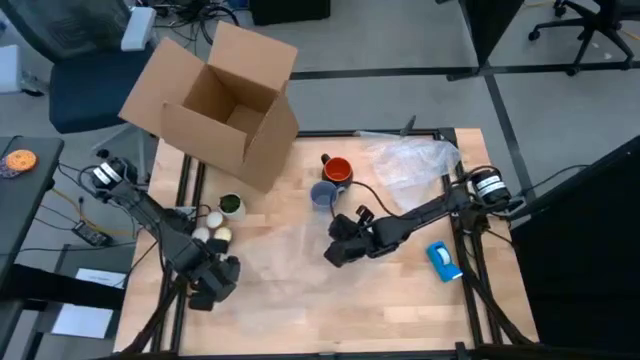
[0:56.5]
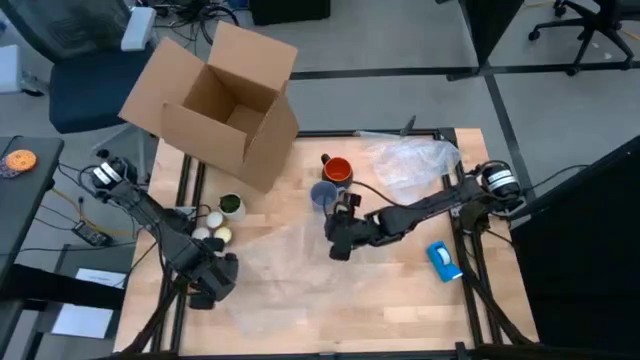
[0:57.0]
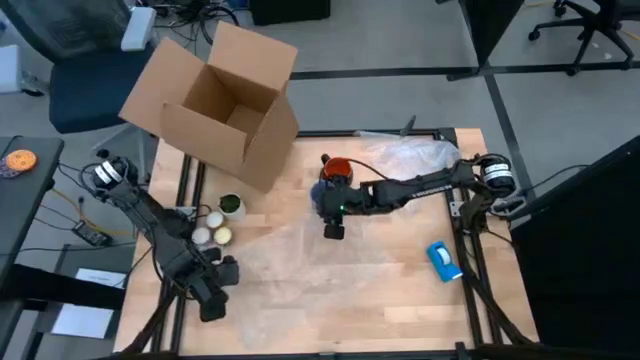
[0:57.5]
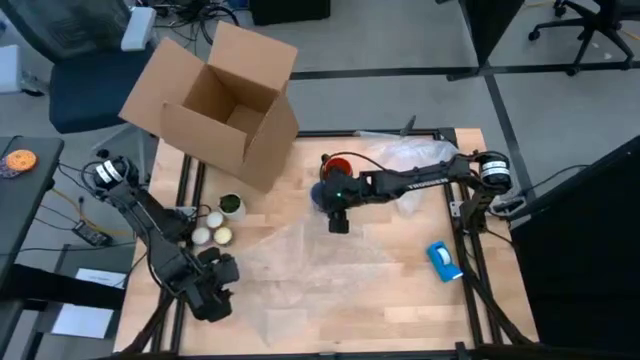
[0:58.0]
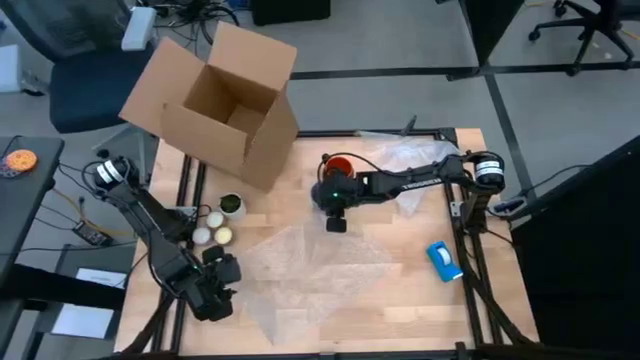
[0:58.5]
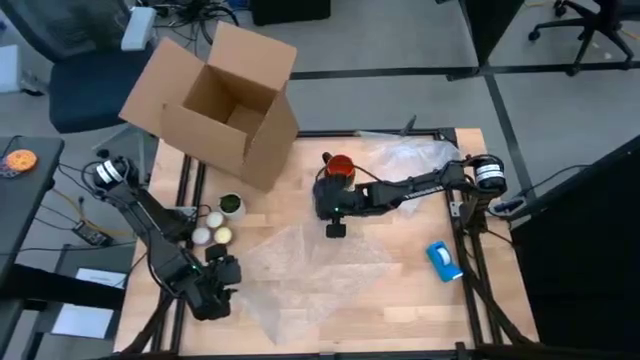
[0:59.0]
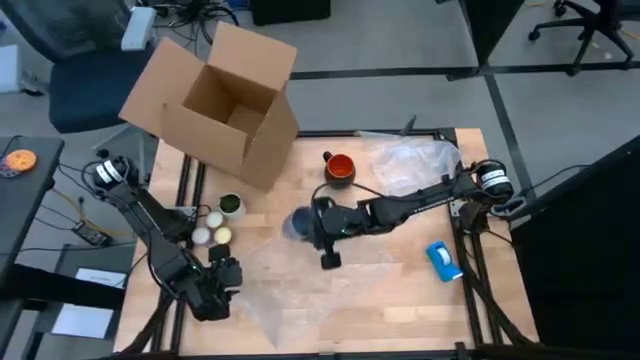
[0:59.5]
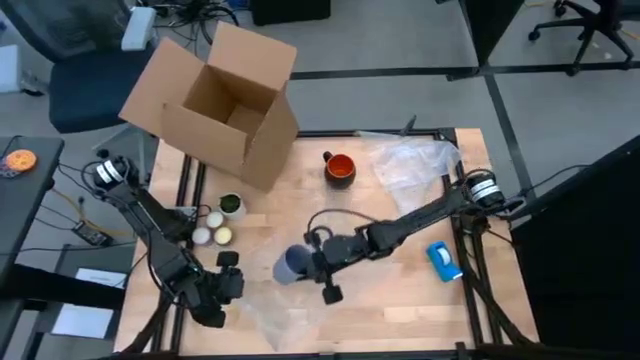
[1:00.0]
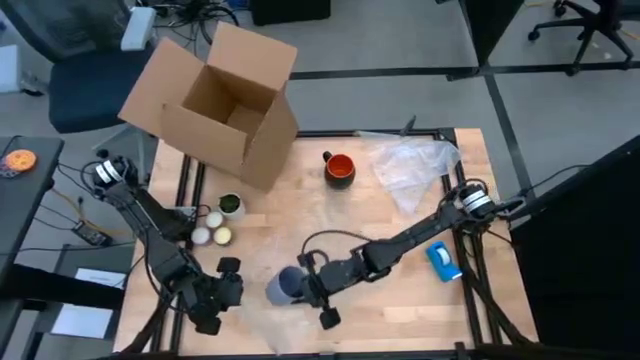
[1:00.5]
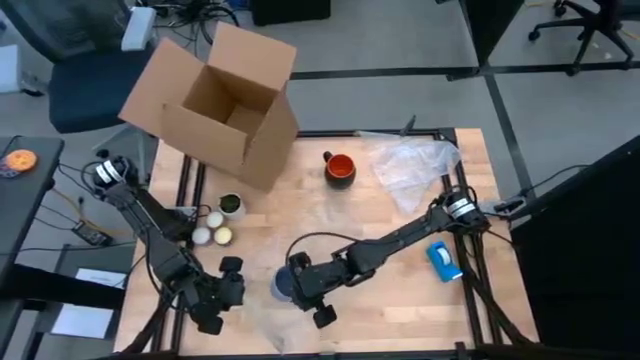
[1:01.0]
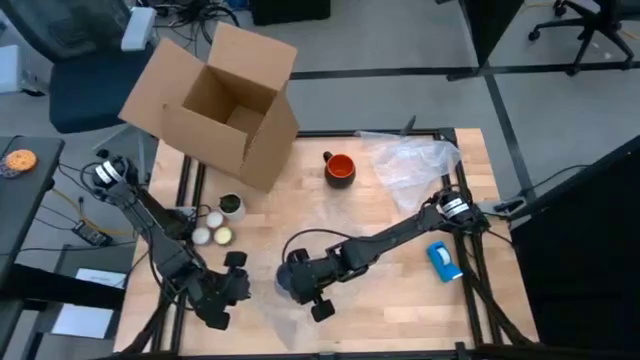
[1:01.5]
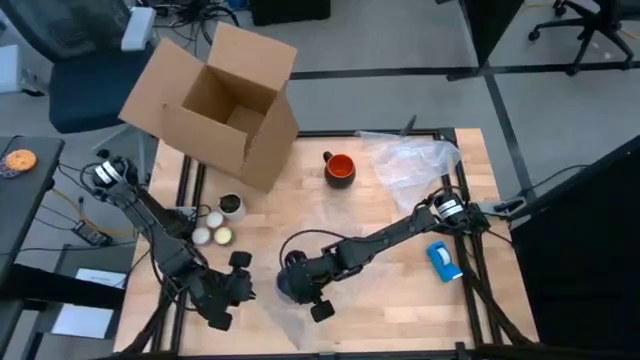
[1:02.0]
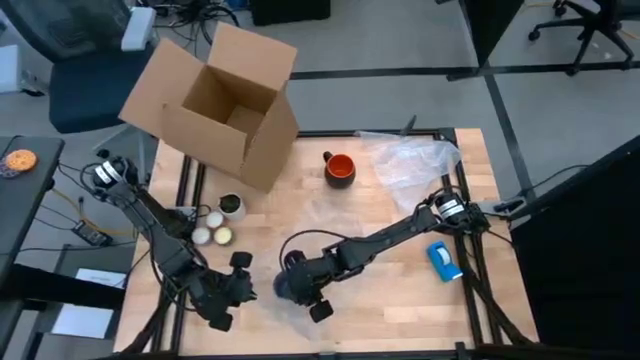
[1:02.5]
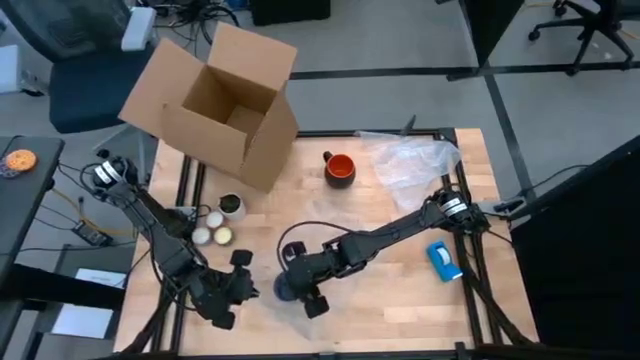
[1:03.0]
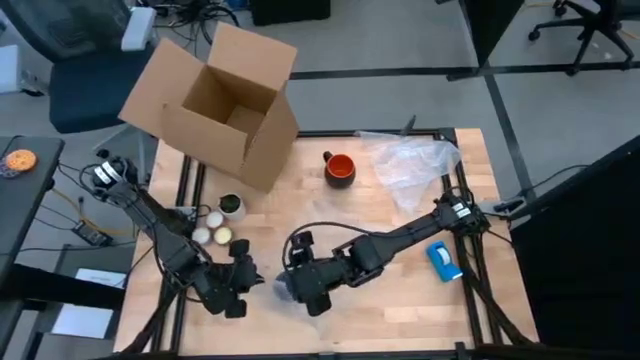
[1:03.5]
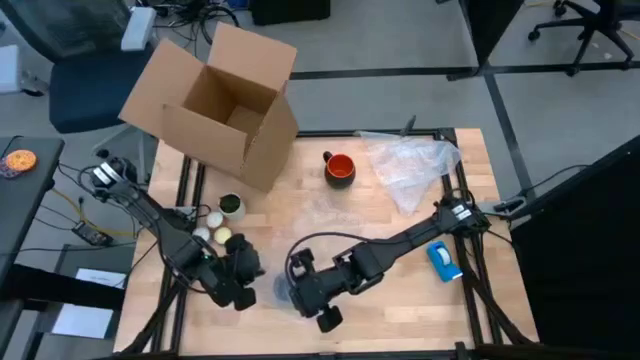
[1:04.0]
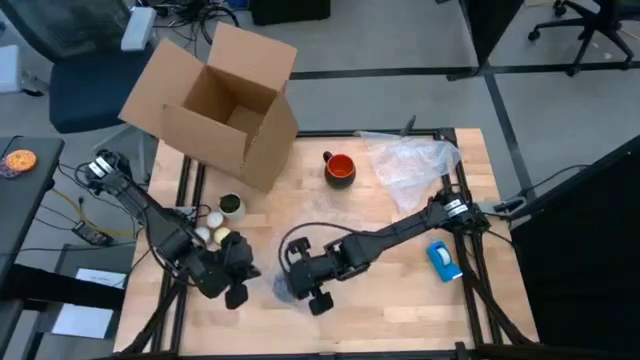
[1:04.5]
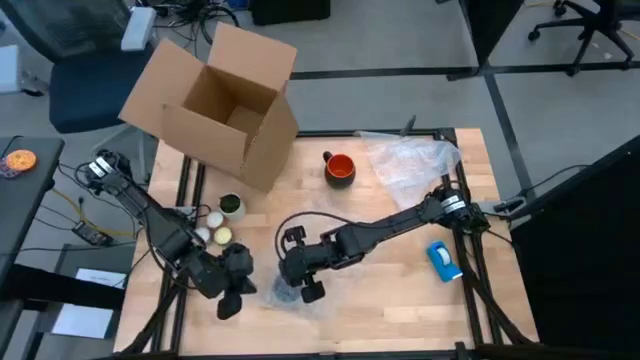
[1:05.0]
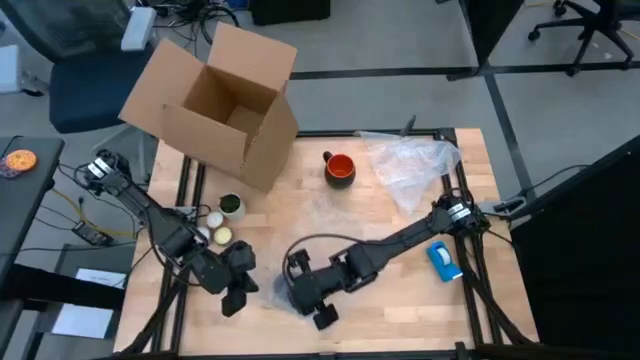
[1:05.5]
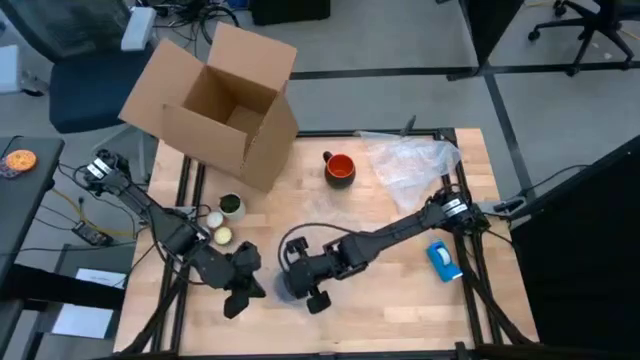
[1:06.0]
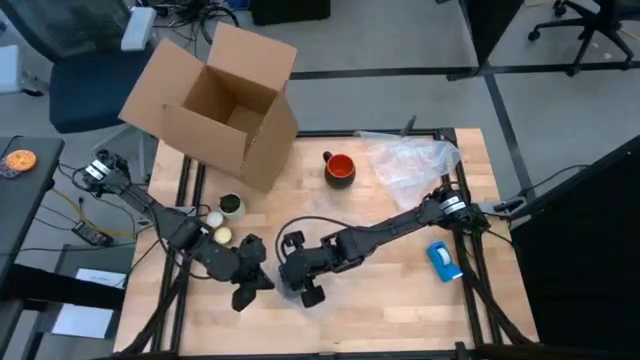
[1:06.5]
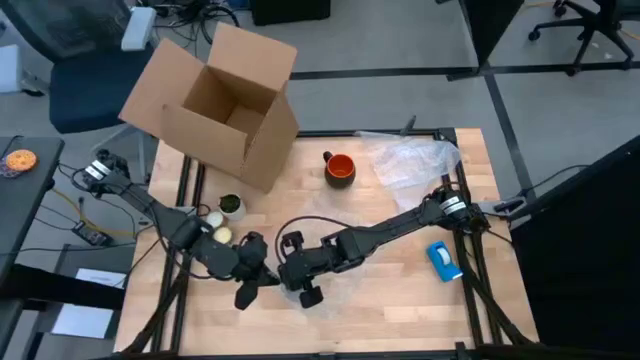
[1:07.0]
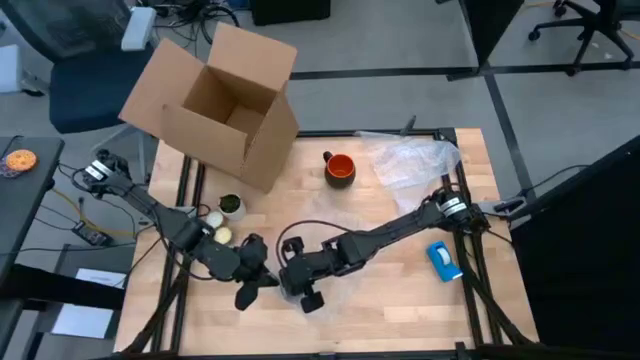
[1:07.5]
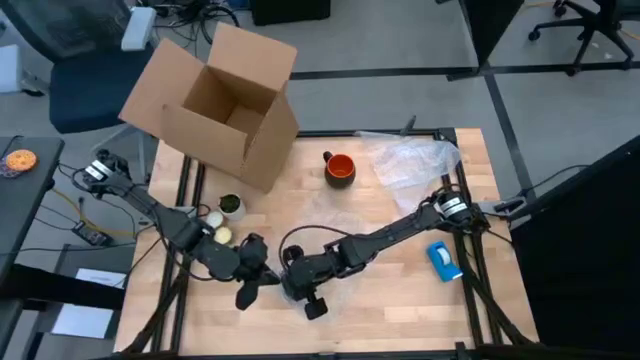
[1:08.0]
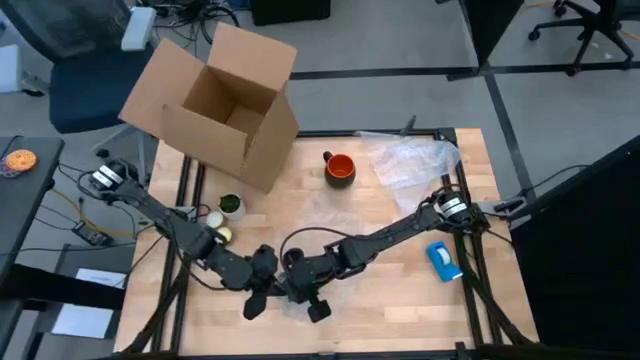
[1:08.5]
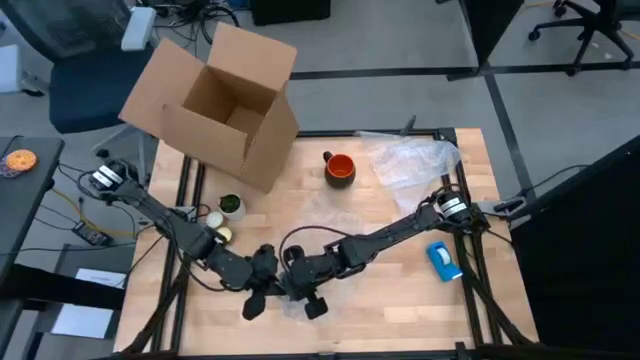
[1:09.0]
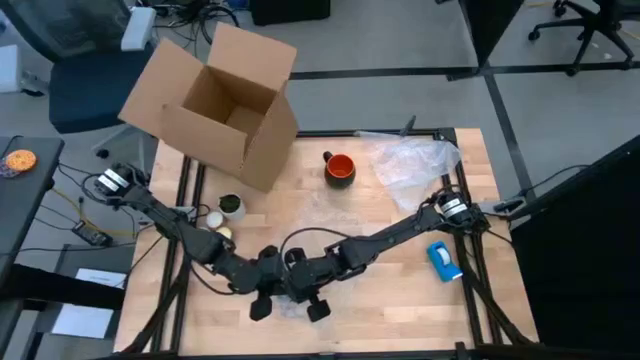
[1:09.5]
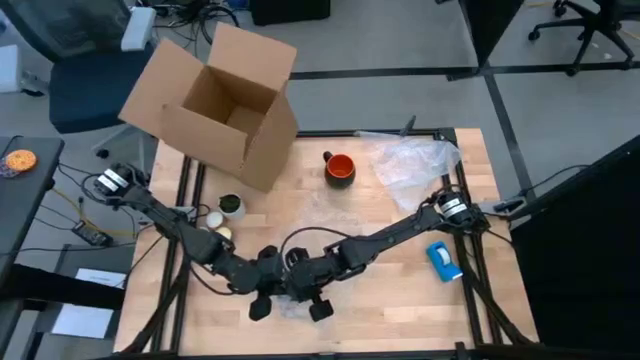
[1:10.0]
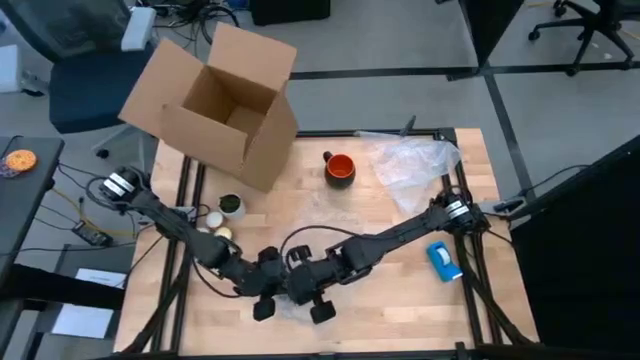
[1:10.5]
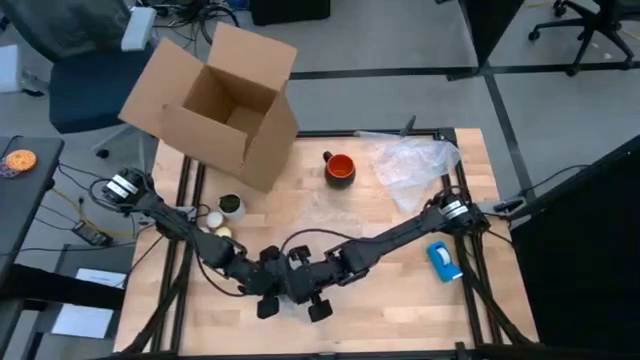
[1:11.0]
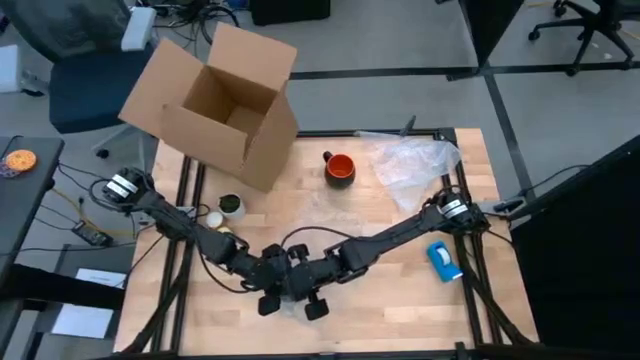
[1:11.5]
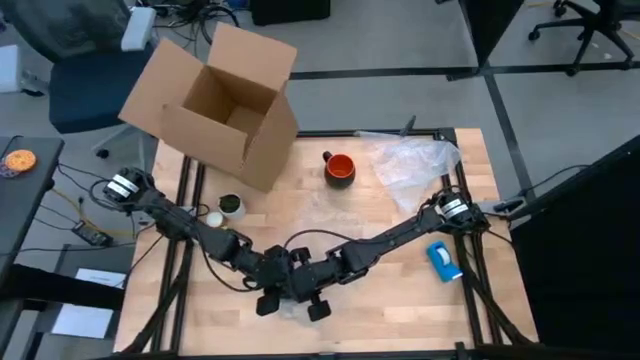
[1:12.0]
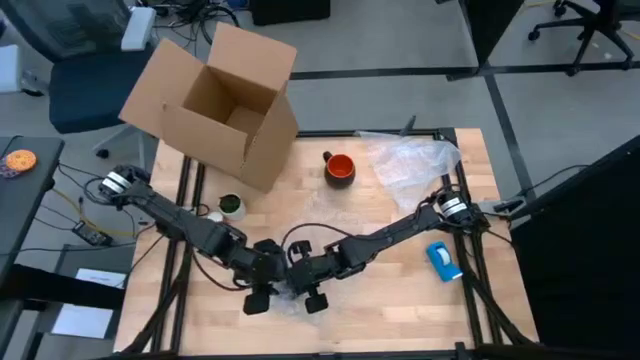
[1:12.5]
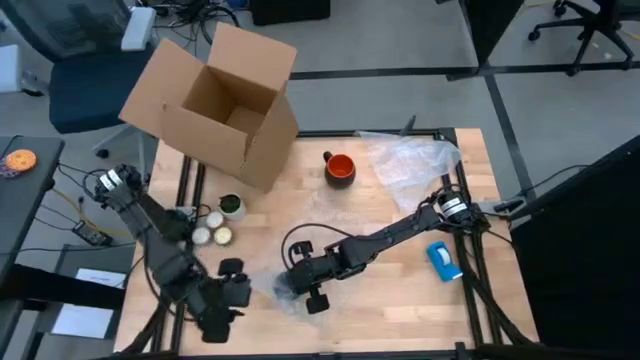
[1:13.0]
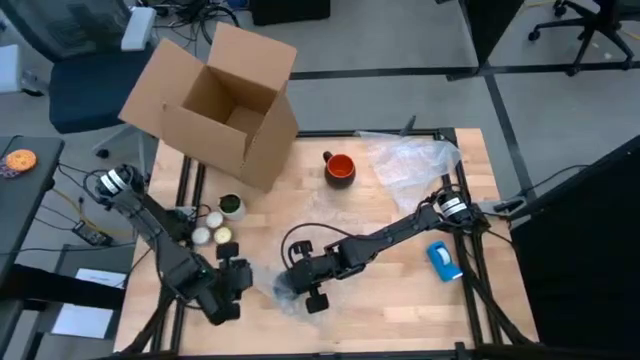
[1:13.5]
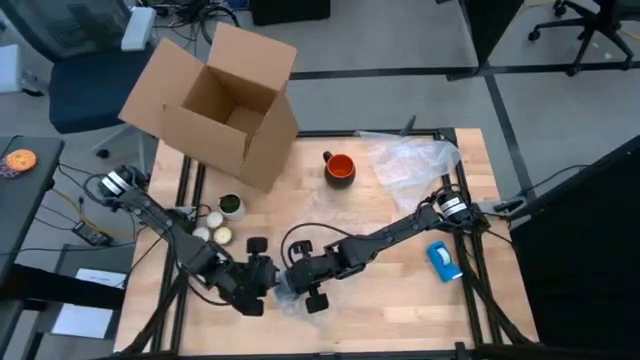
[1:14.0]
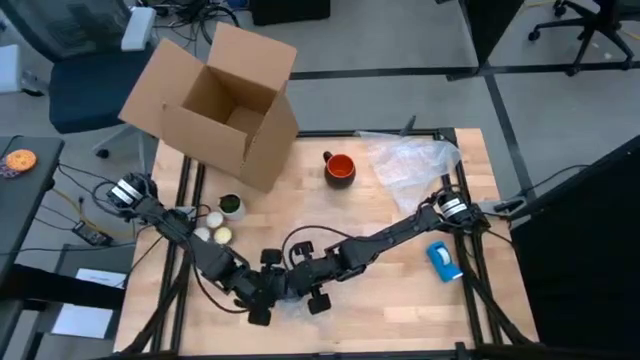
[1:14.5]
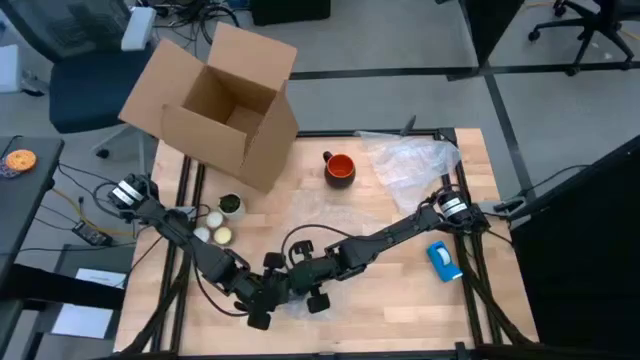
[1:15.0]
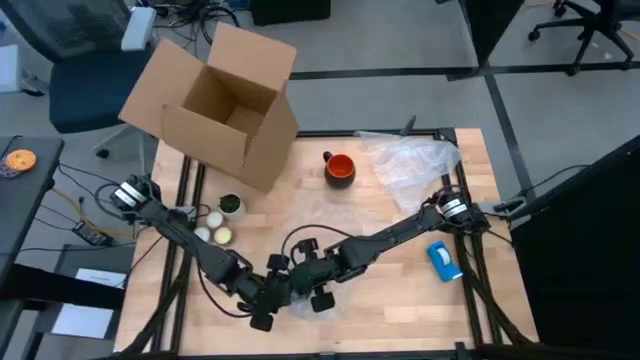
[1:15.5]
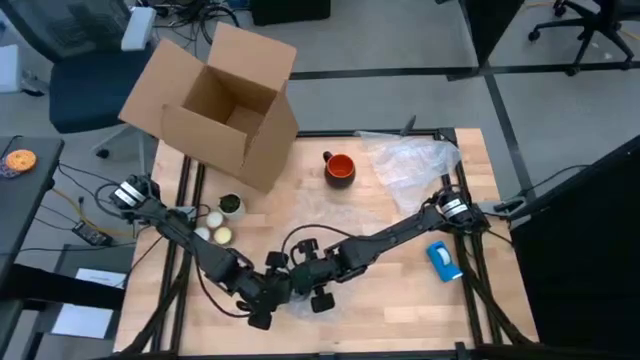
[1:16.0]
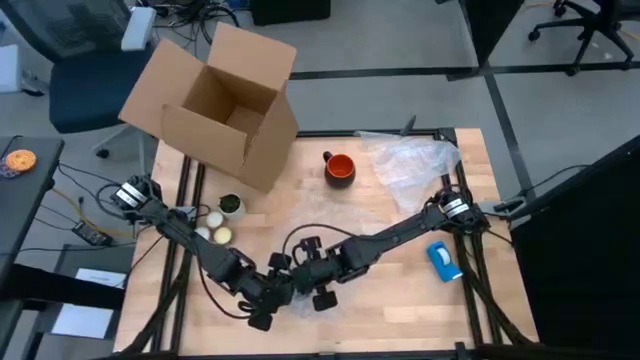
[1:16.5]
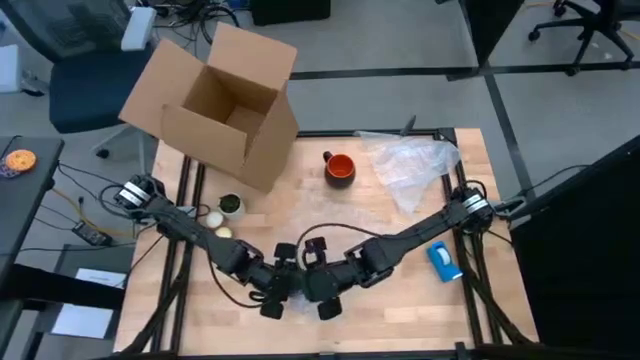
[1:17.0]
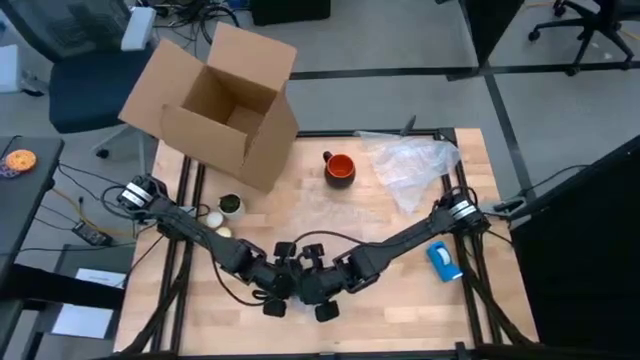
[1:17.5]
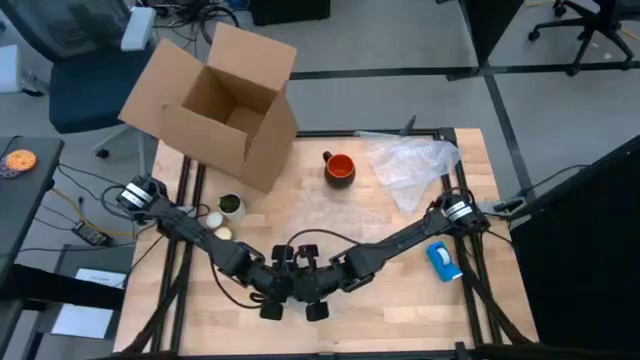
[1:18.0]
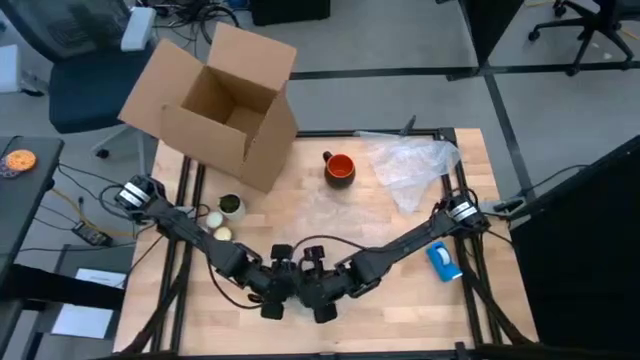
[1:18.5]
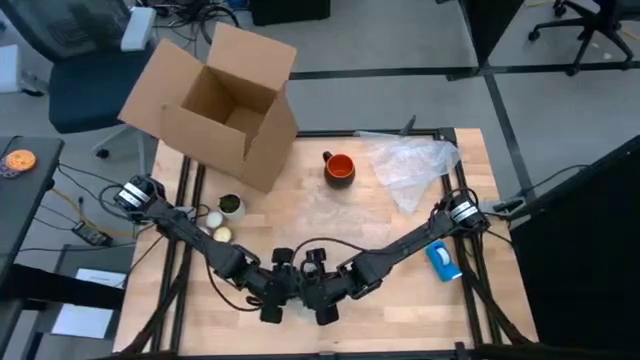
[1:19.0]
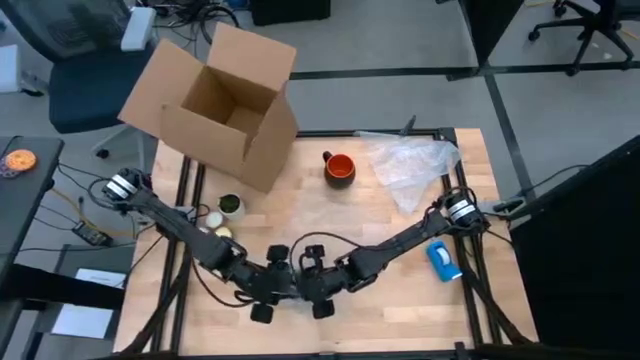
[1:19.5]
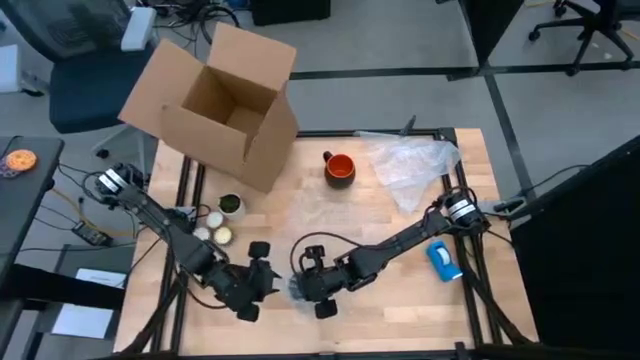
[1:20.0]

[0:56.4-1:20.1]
Task: wrap mug
Wrap the blue mug with bubble wrap
